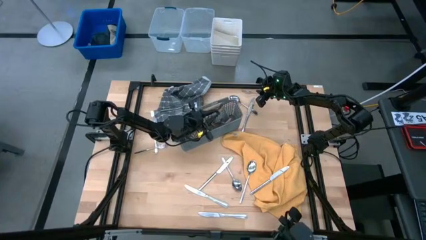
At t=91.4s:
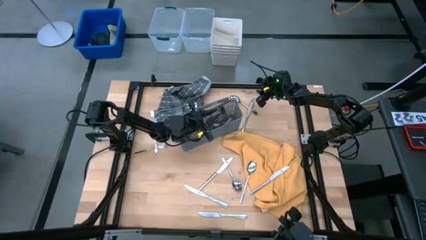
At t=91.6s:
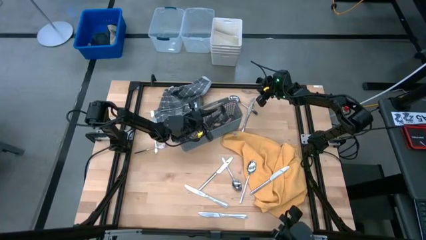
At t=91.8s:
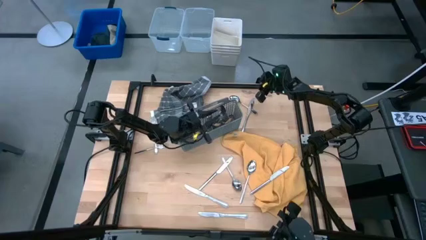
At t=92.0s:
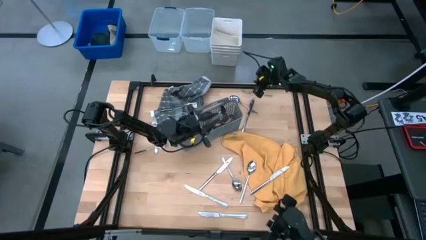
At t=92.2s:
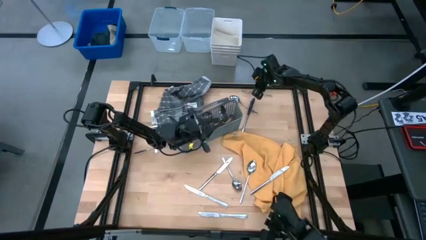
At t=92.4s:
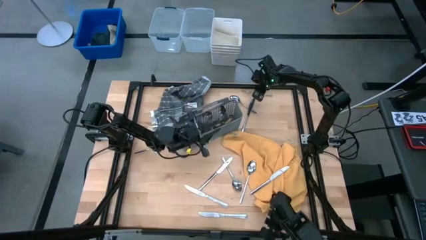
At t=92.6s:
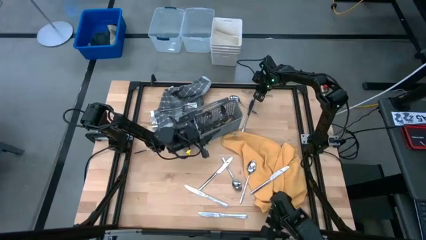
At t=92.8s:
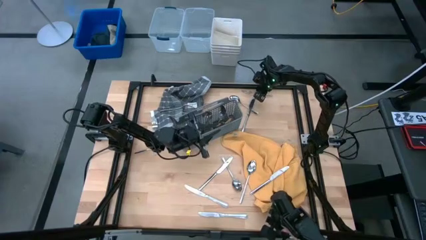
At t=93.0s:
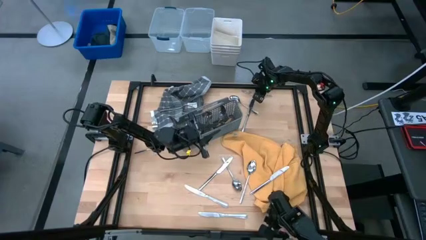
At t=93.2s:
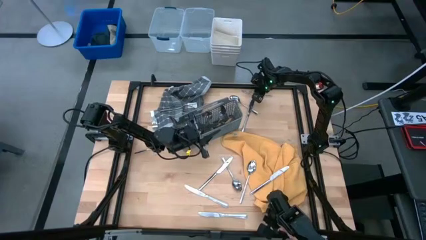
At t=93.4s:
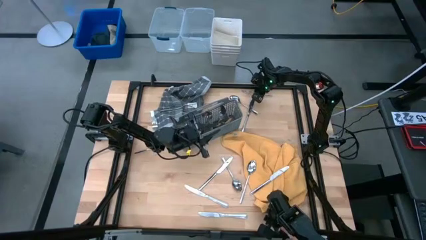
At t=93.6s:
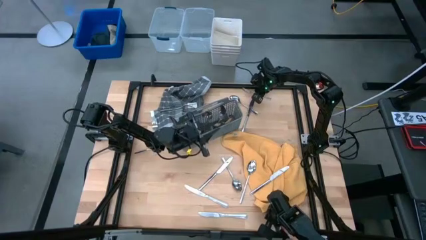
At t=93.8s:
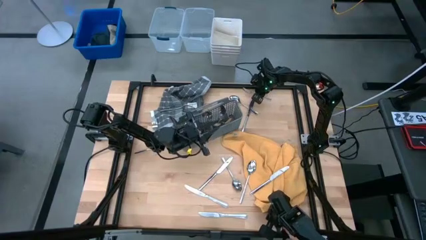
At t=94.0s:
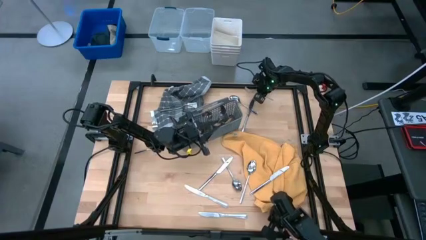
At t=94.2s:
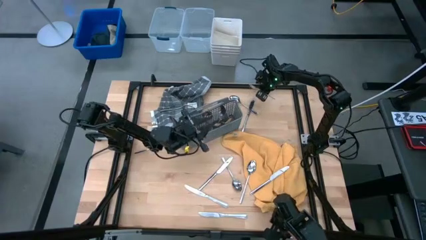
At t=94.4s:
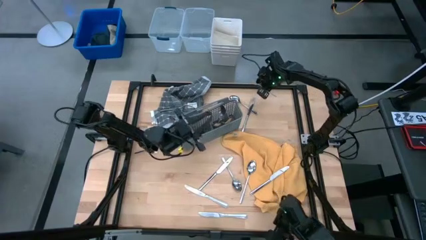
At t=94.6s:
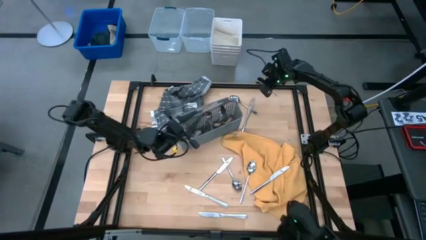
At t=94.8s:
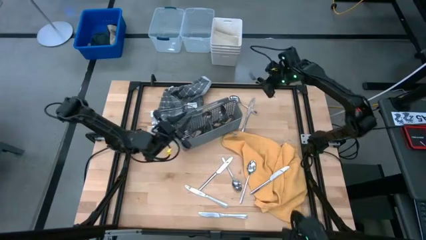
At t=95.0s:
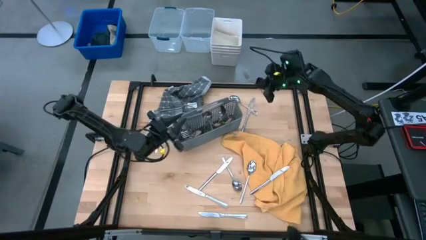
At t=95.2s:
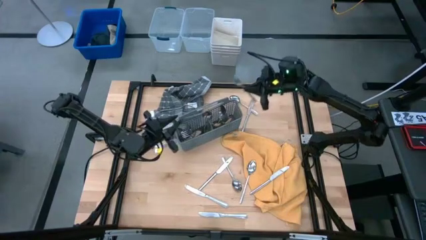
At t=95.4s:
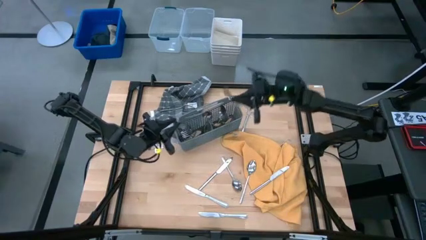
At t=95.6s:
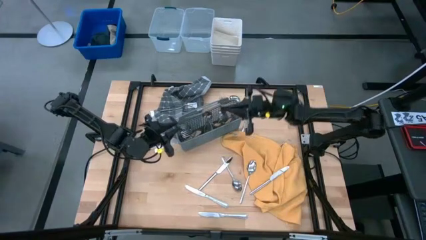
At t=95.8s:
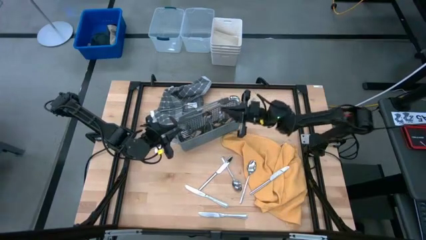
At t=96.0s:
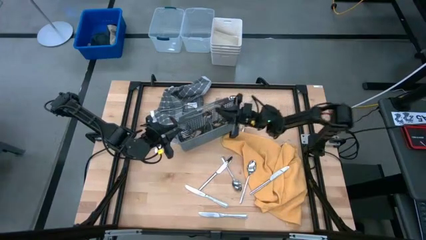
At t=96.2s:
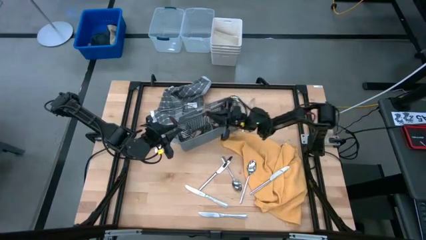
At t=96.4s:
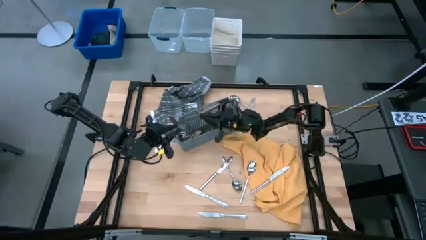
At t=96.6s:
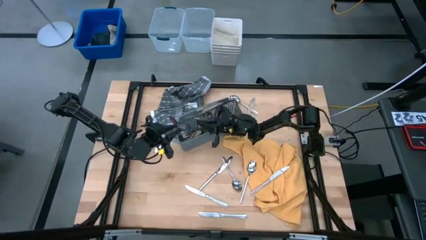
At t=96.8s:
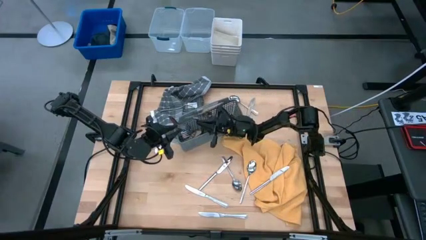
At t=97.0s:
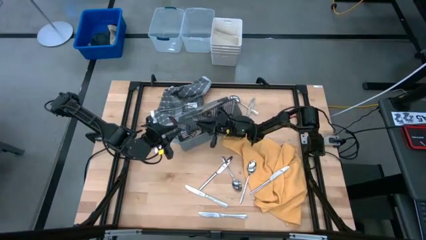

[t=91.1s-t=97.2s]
Task: Sort silverware
Put the silver fork into the gray silverware basket

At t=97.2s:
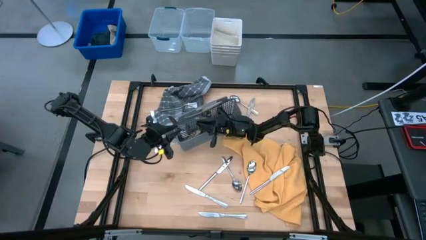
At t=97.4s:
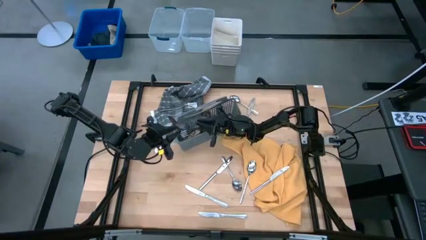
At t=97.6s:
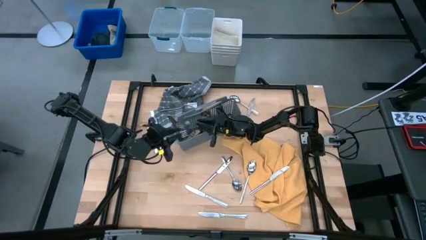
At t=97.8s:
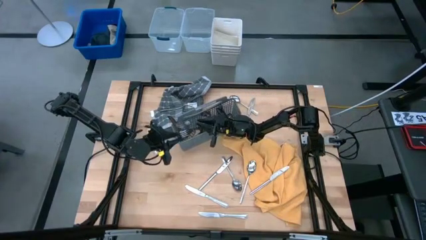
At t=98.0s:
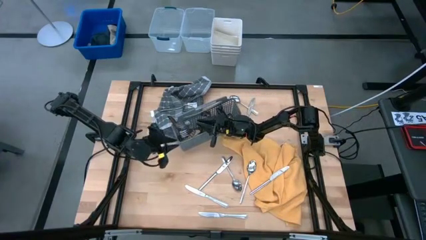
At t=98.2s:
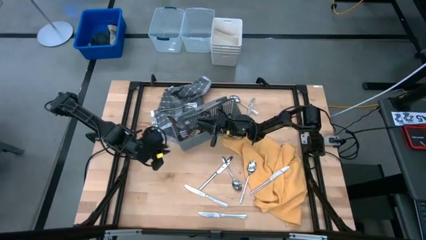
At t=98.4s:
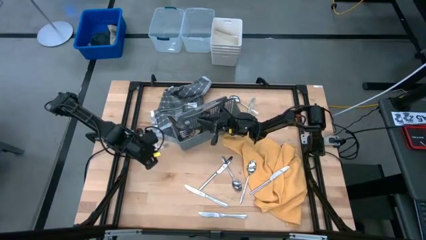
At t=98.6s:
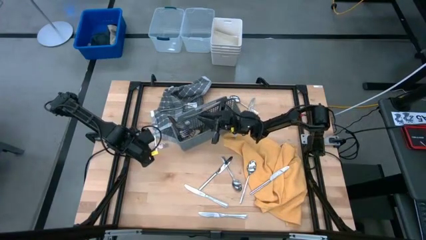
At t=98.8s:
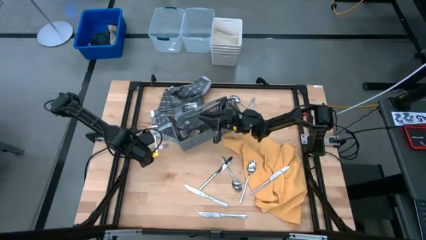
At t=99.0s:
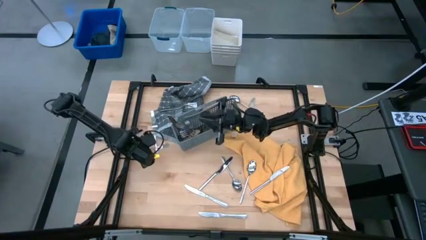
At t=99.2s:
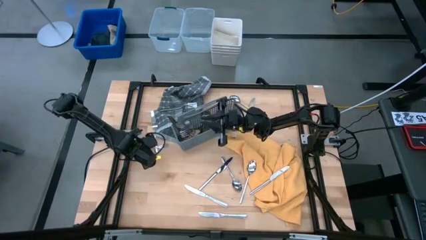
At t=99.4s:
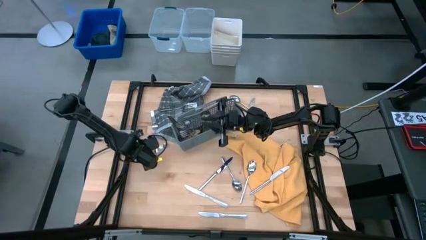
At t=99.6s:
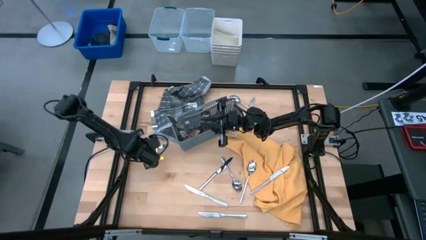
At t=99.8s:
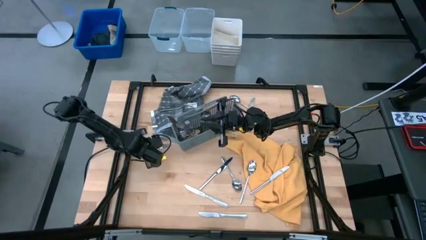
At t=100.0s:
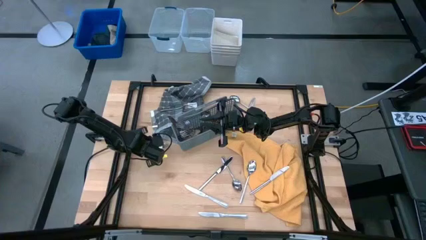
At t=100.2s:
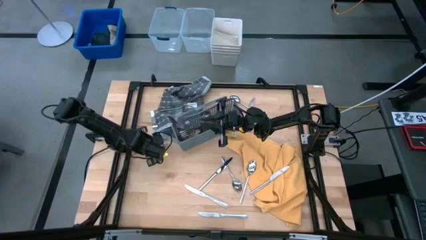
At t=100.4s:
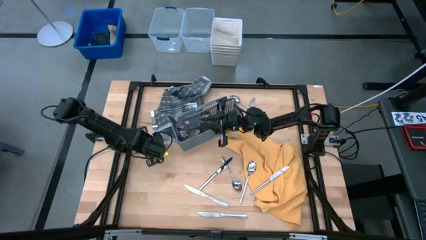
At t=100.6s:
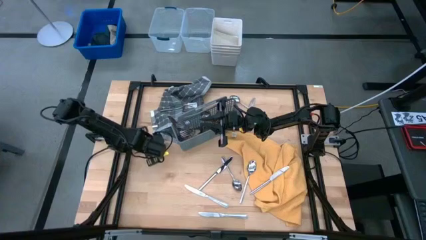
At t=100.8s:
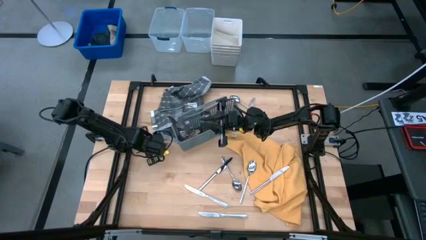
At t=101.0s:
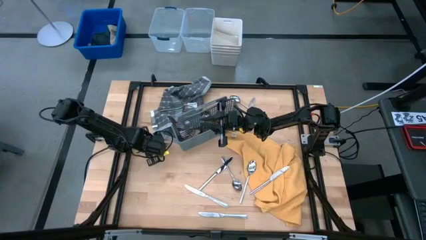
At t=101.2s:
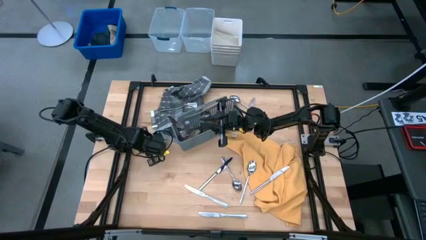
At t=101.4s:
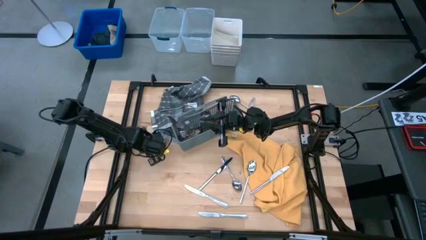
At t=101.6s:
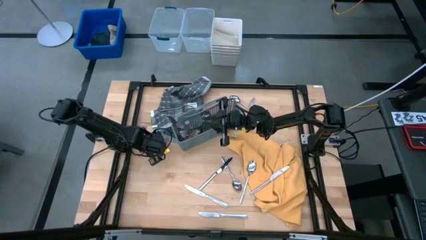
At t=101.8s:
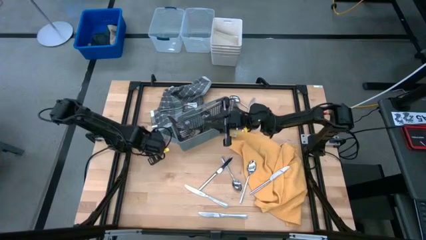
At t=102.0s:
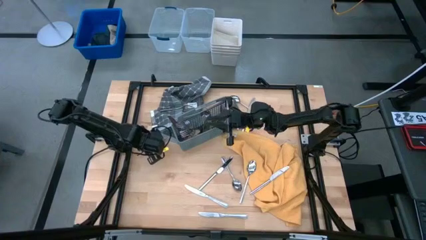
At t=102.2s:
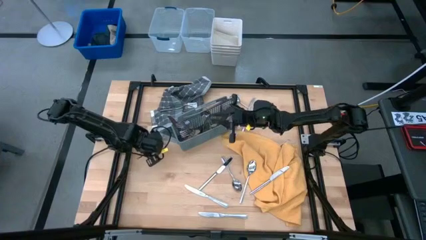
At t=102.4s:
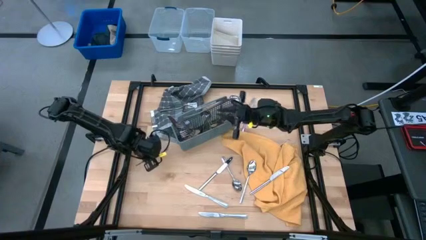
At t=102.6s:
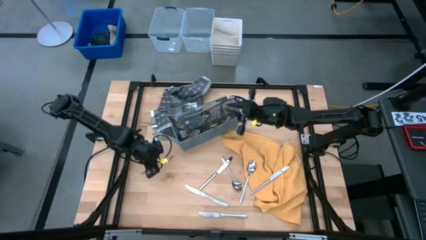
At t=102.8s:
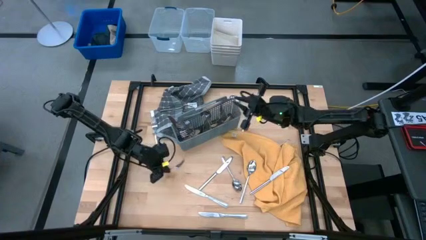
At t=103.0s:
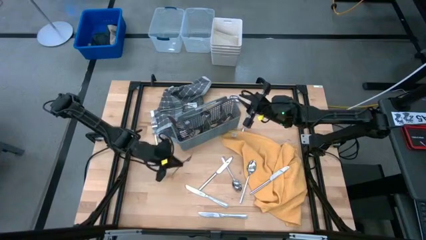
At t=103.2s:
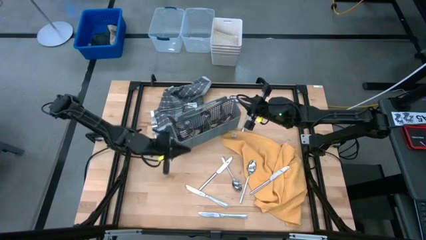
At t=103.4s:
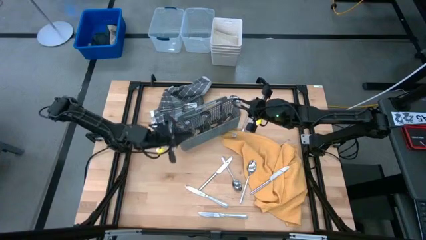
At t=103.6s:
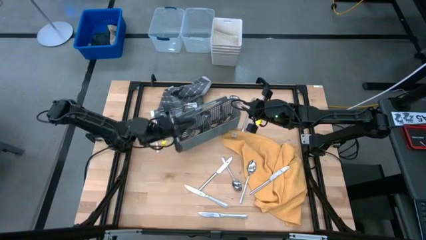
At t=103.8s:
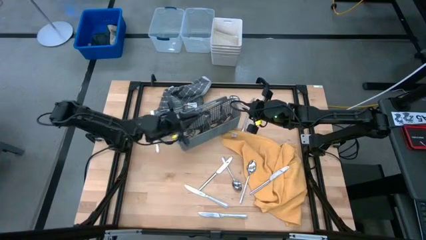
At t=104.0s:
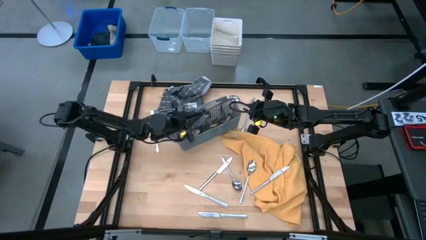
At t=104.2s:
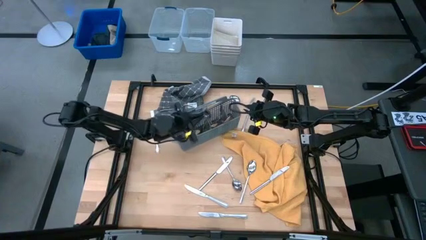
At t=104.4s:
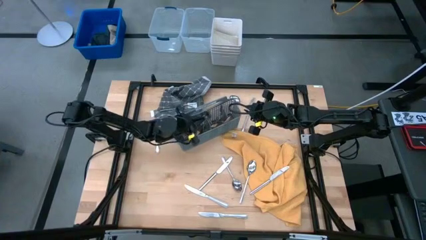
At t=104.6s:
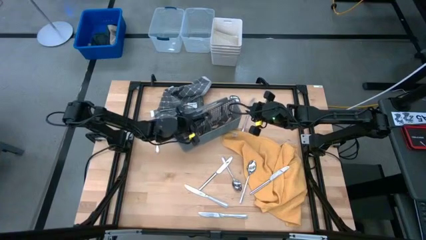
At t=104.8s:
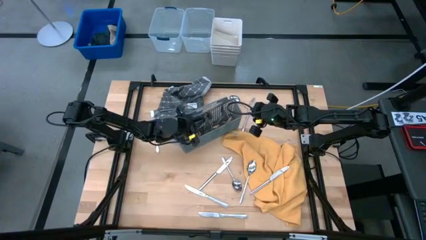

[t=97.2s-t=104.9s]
Put the silver fork into the gray silverware basket
